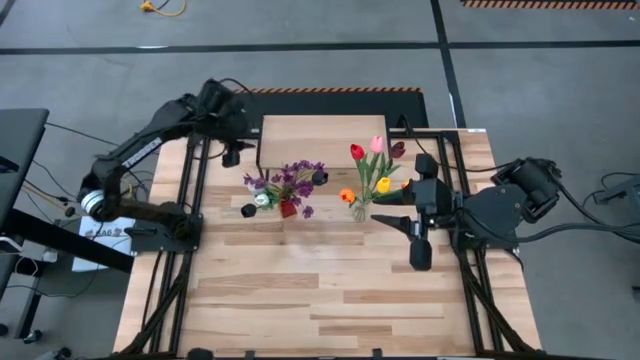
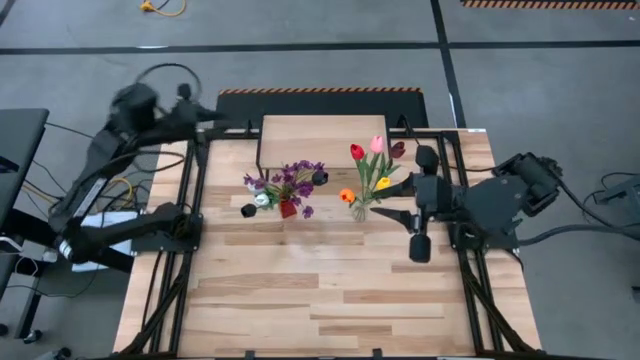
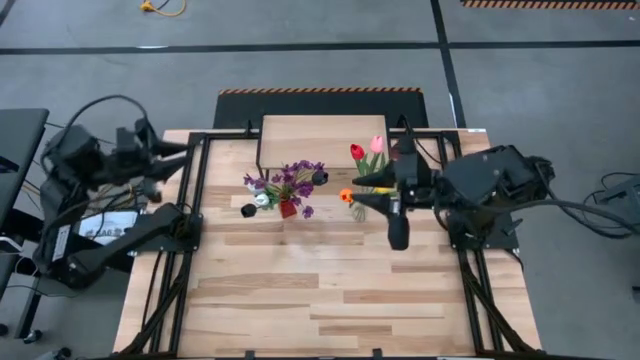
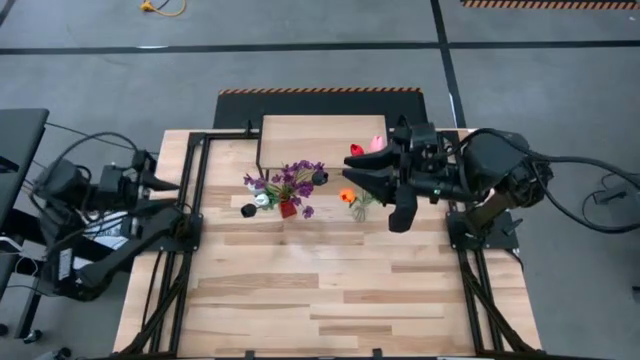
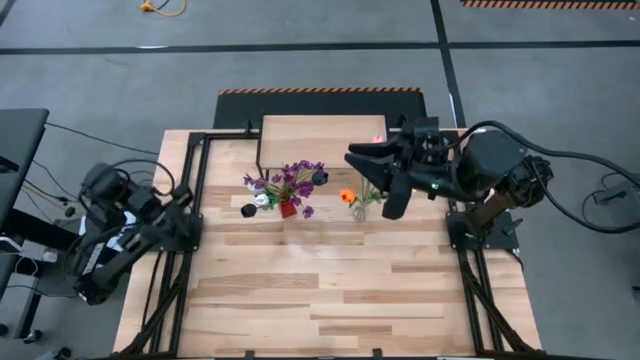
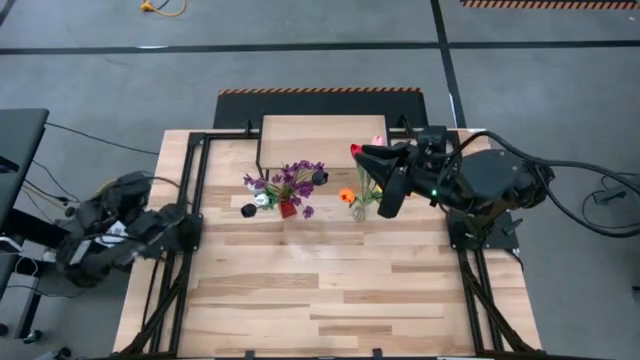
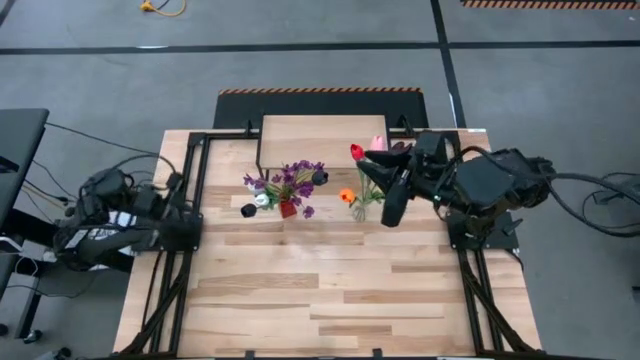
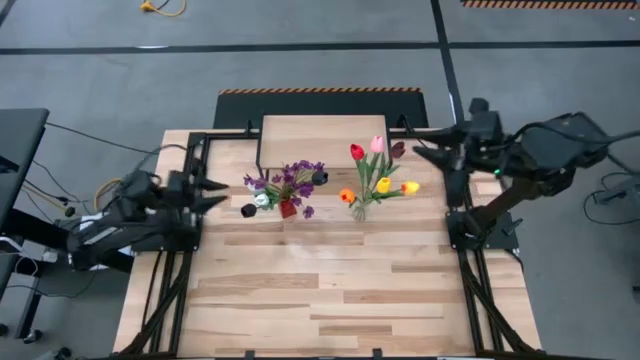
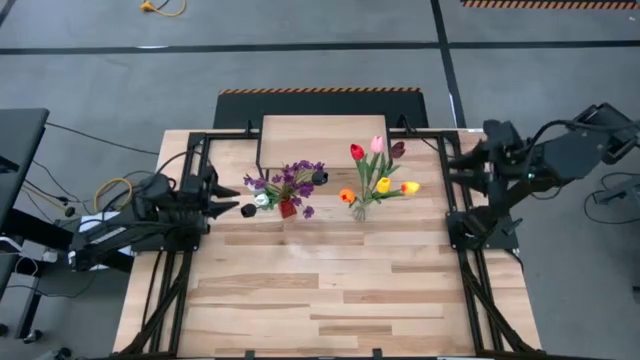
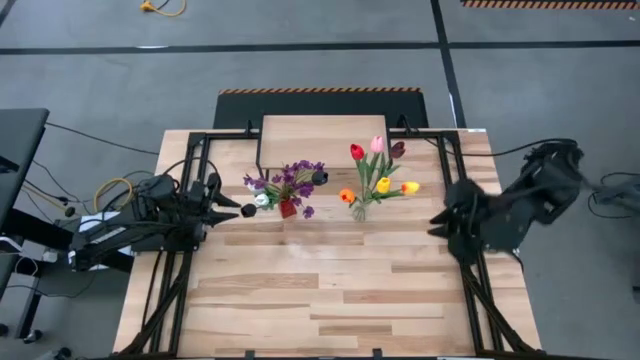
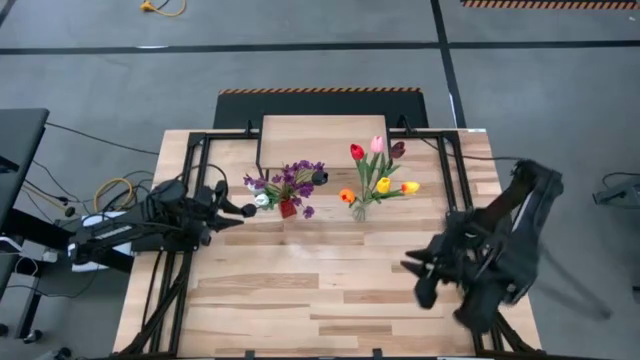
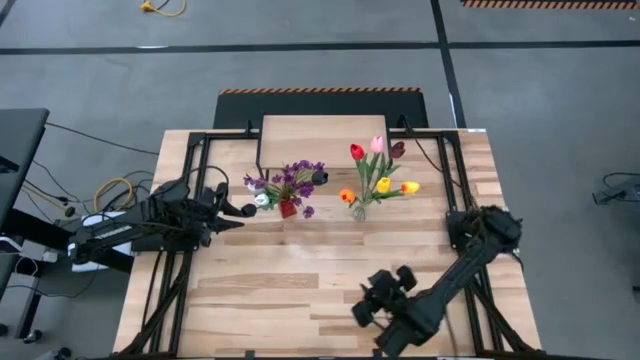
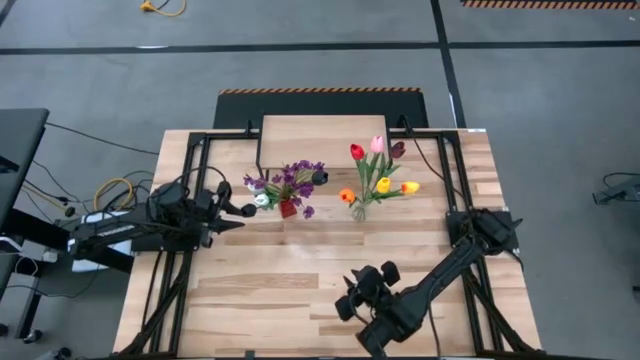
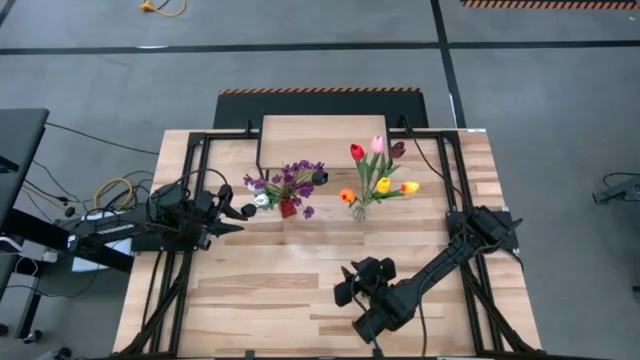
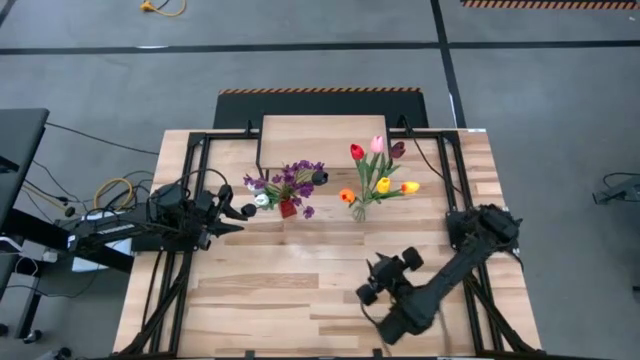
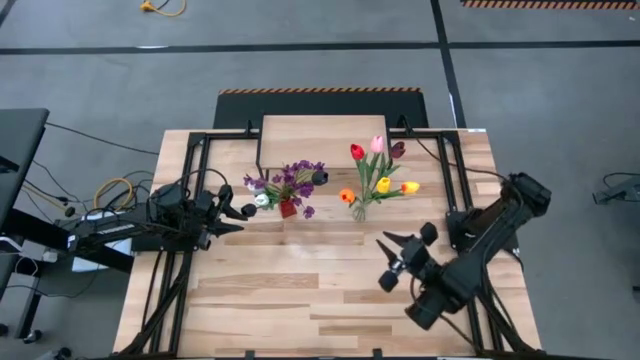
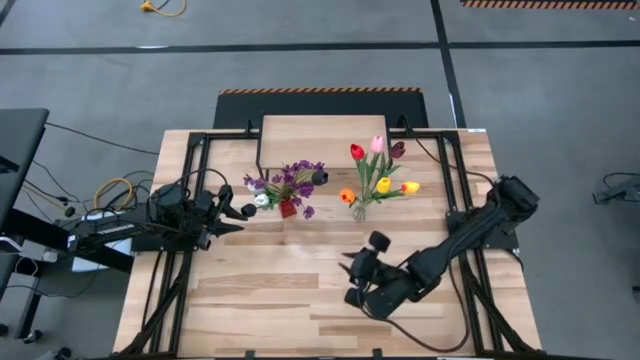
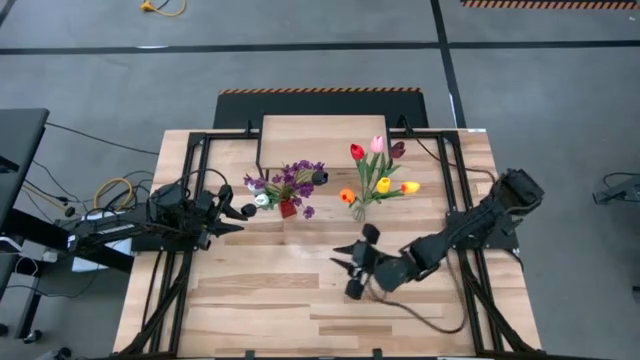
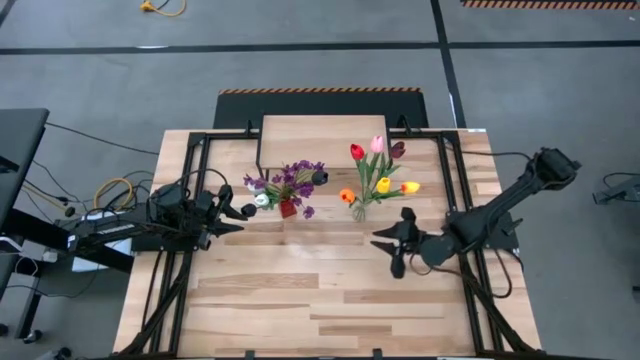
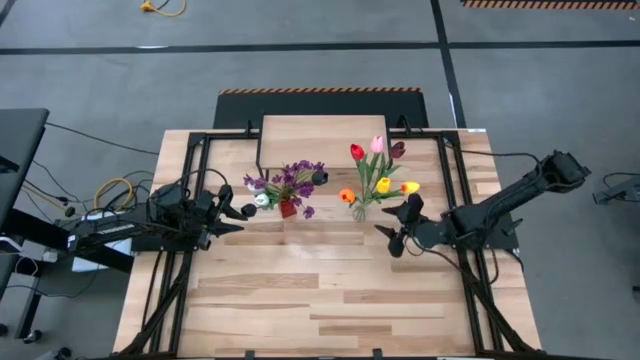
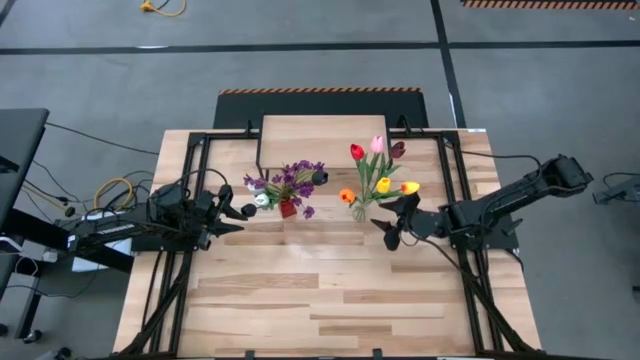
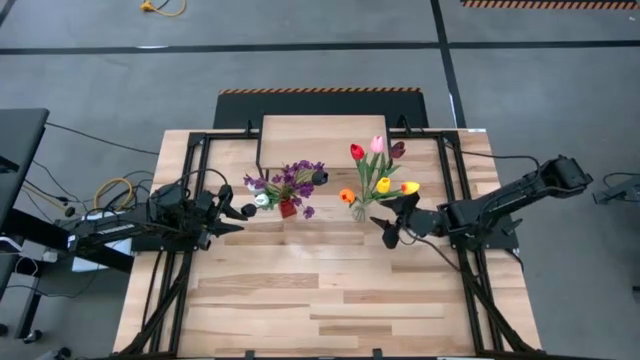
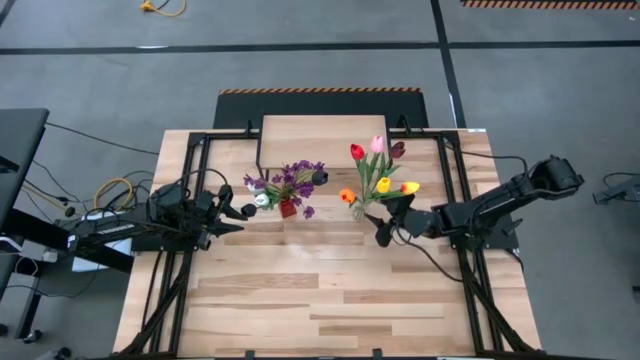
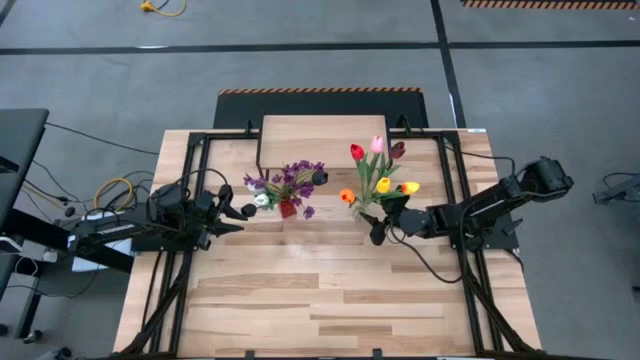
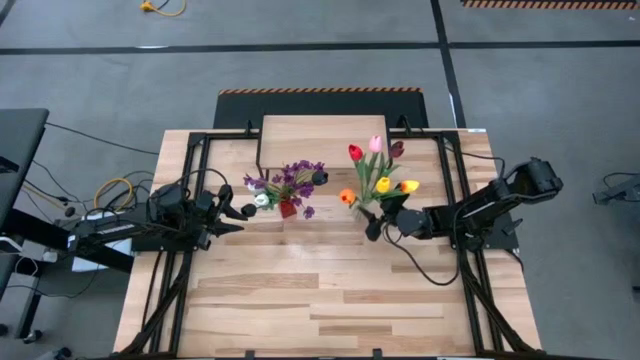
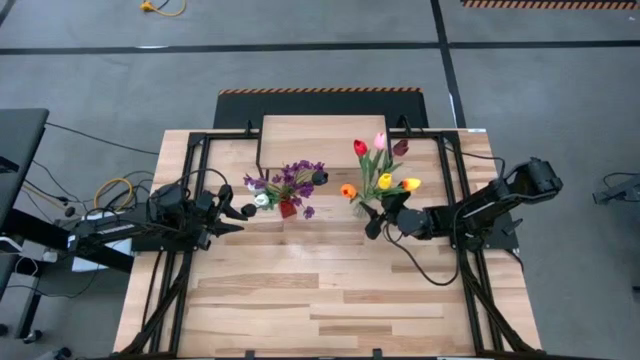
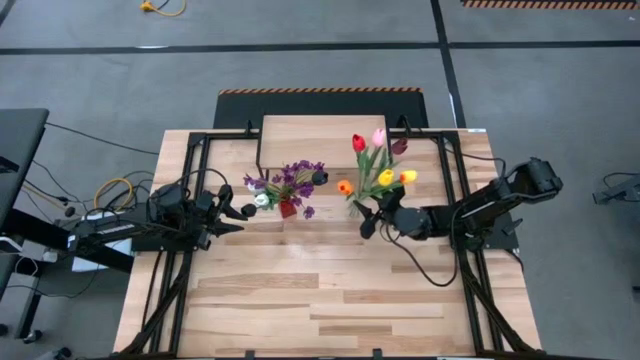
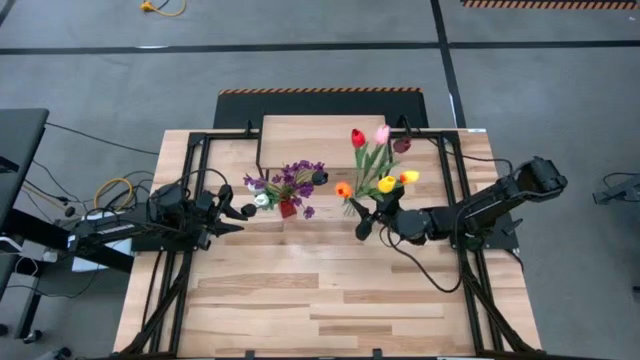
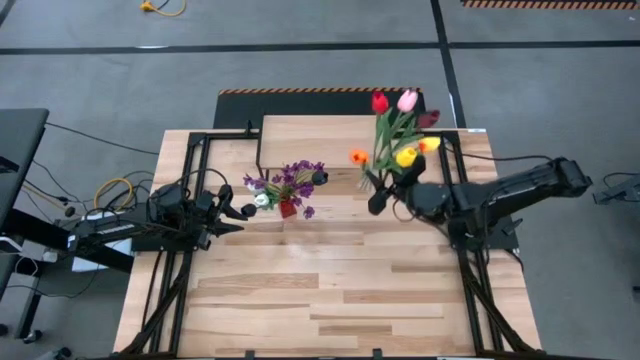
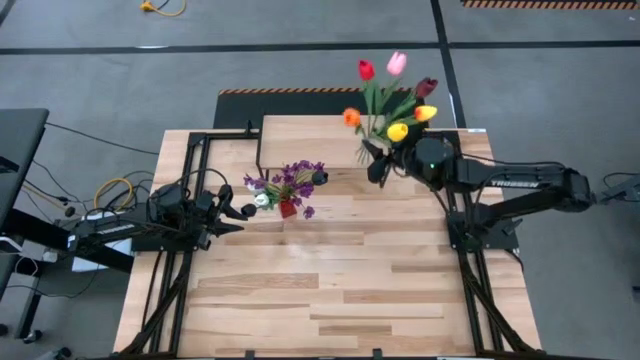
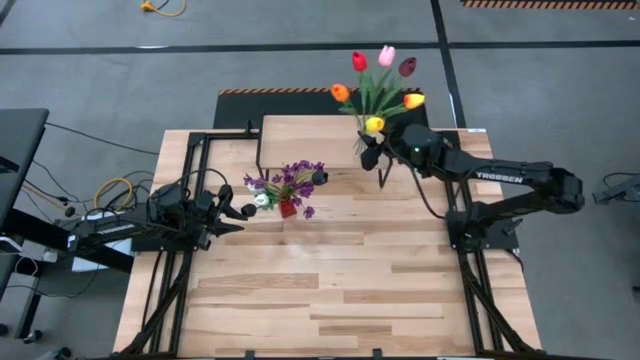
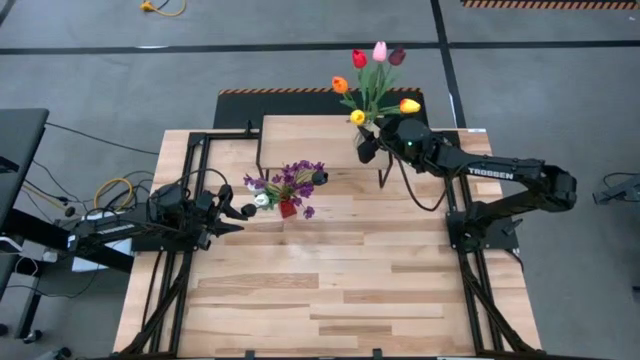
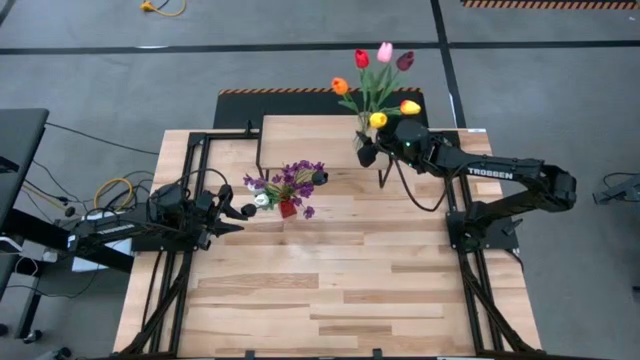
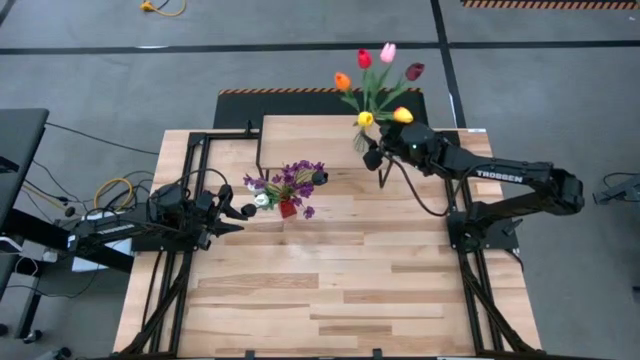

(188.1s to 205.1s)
Task: Pick and place flowers into a vace then onto a shelf
Put the transparent vase with flowers on the shelf

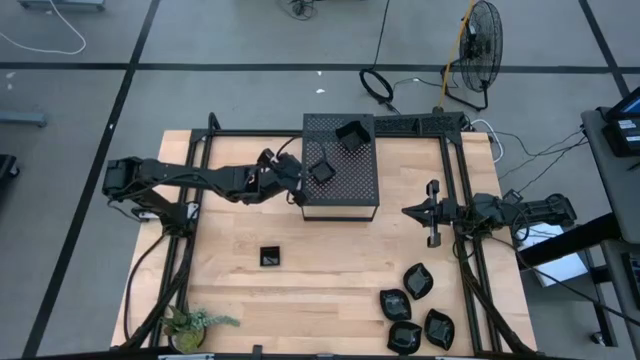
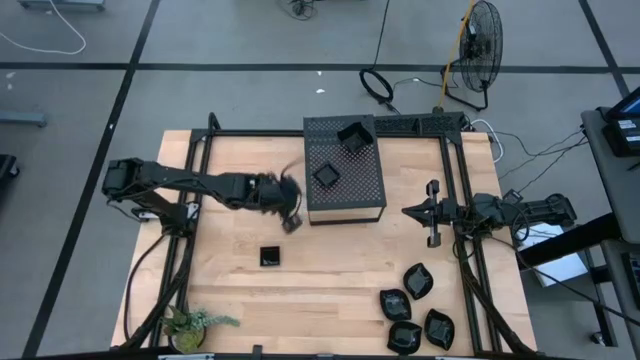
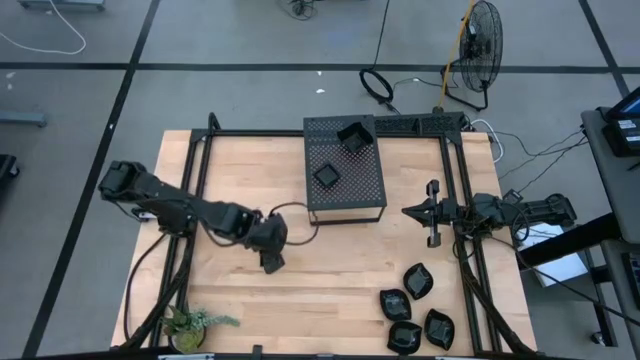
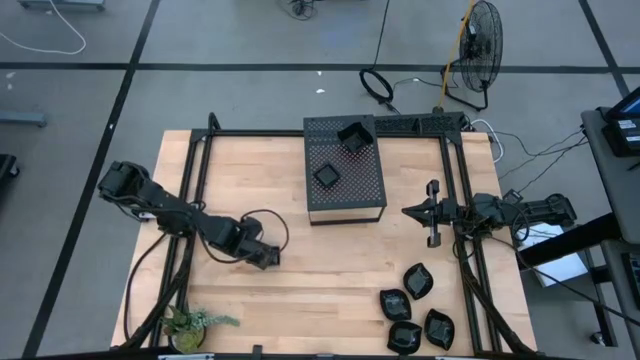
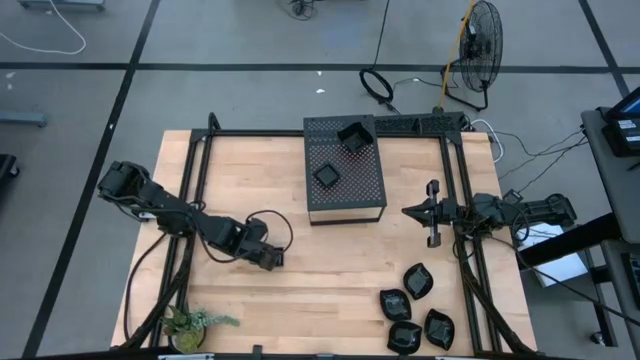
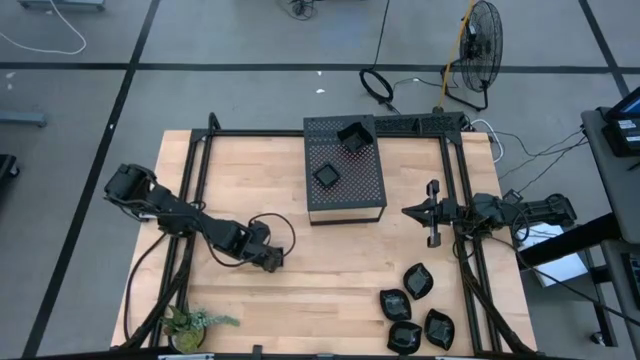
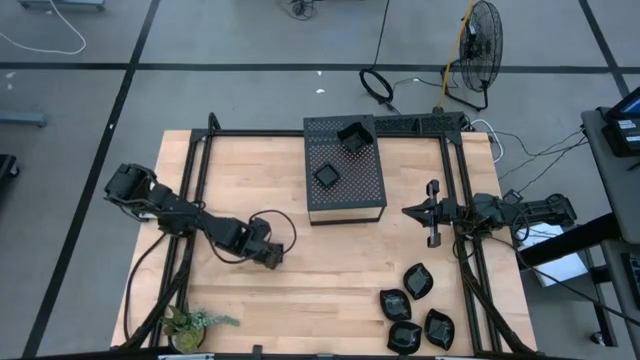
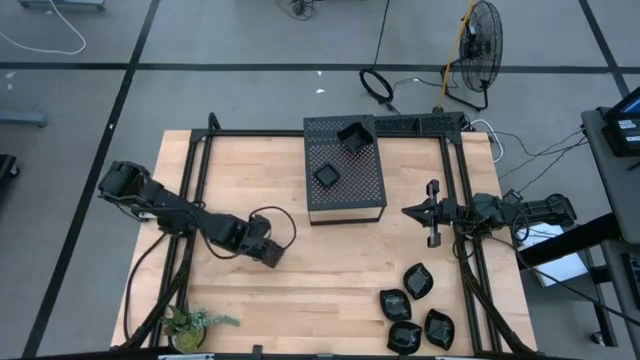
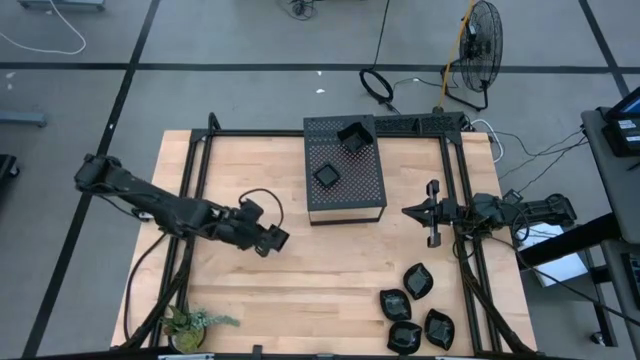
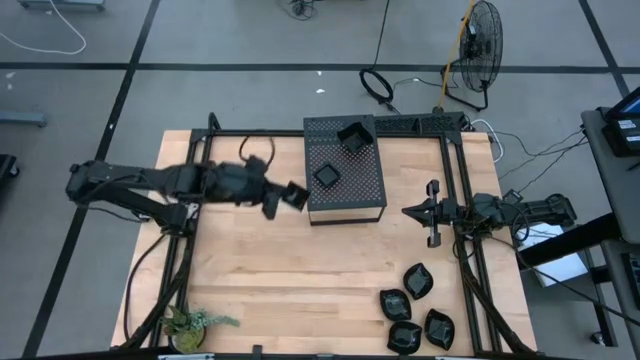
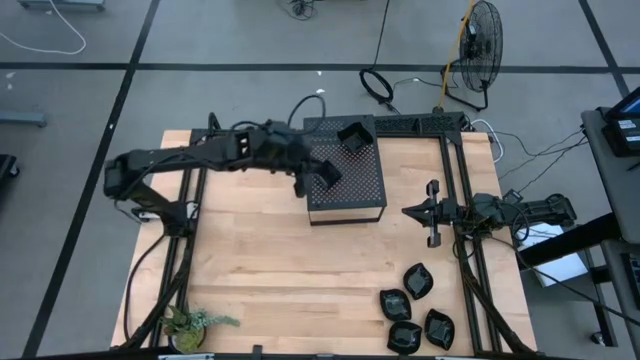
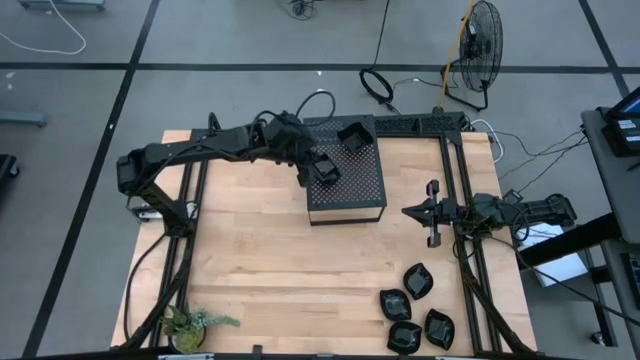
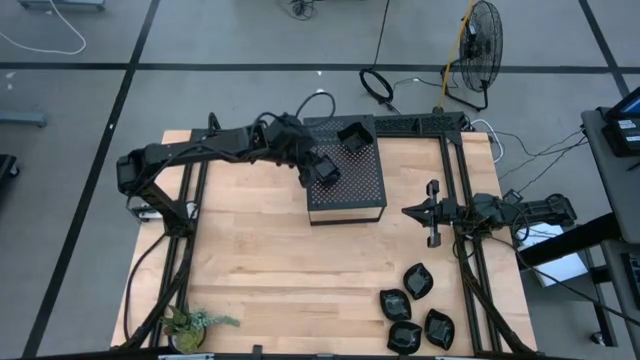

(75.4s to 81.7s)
Task: Pick & Place Mini shaped plates
Stack the square plate on top of the square plate on the shelf
